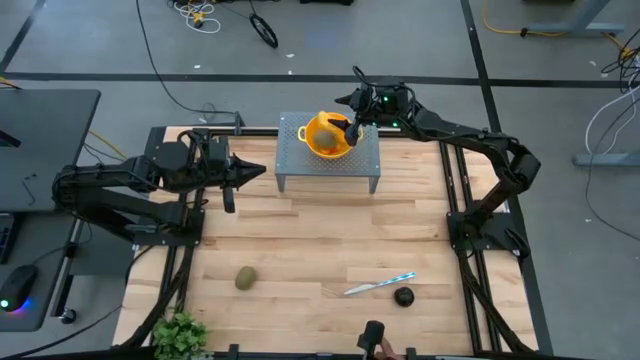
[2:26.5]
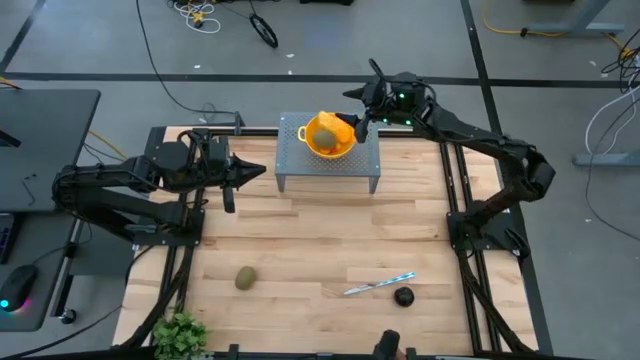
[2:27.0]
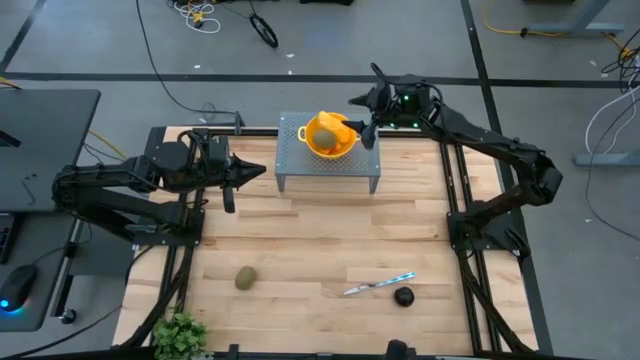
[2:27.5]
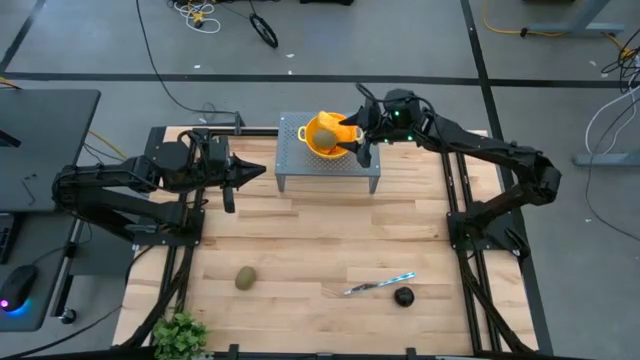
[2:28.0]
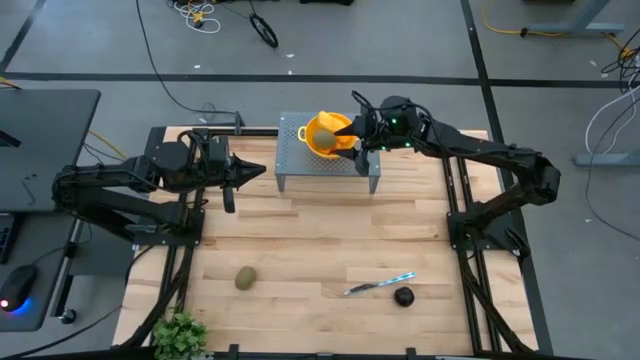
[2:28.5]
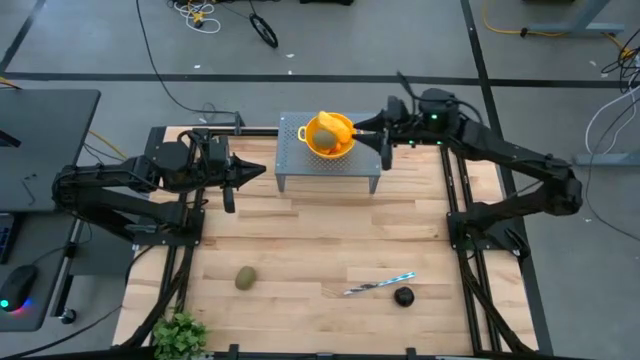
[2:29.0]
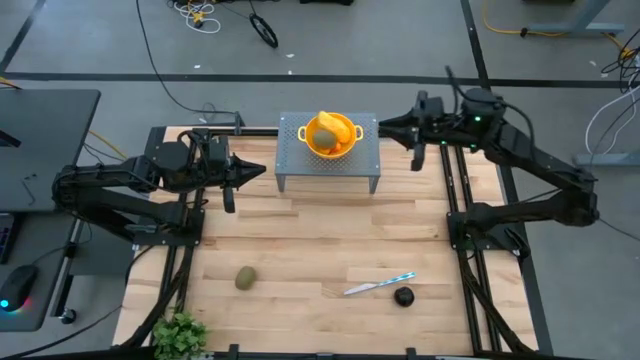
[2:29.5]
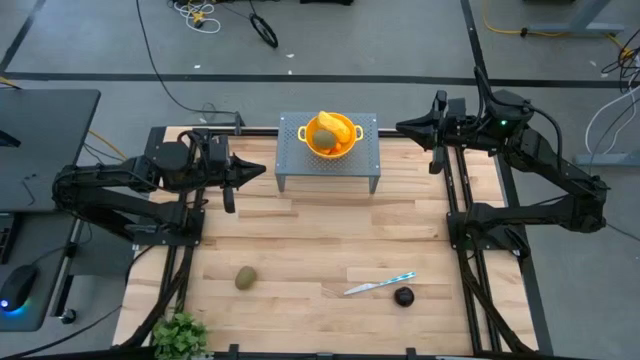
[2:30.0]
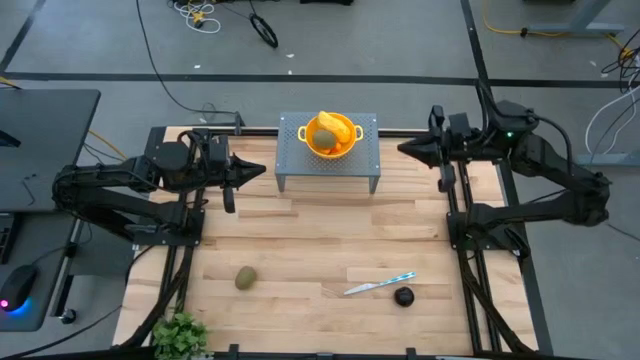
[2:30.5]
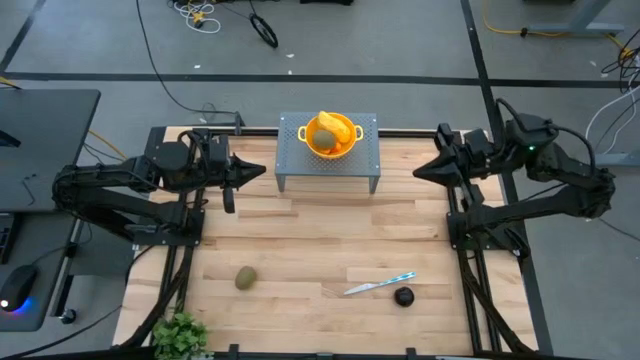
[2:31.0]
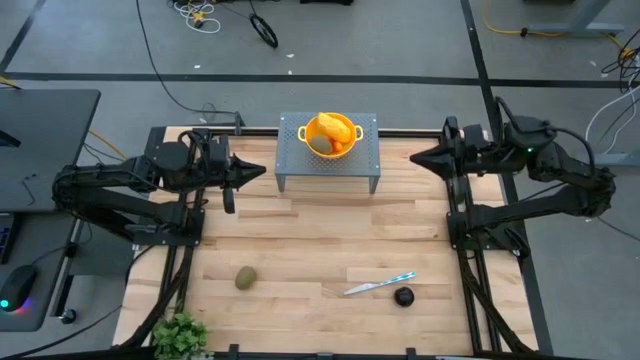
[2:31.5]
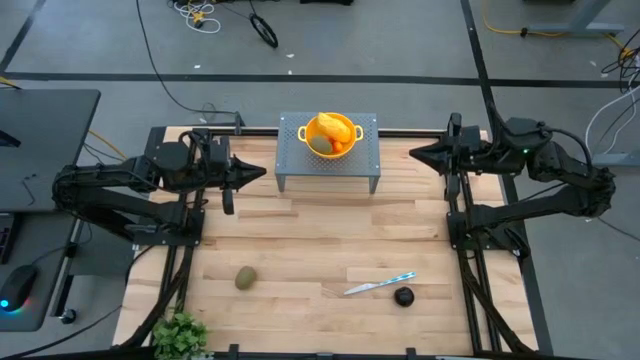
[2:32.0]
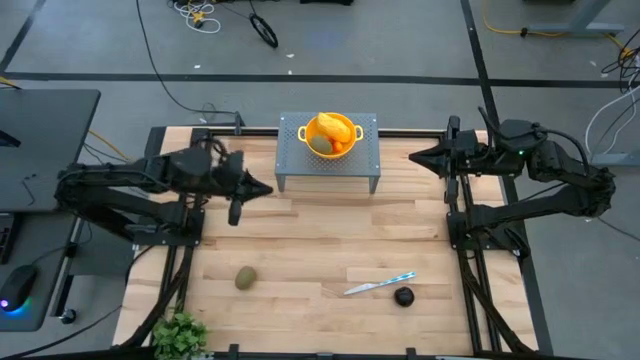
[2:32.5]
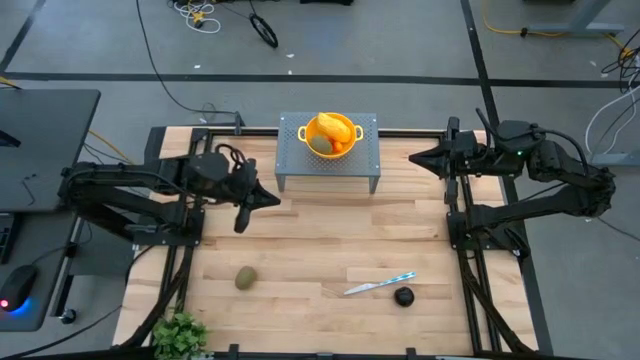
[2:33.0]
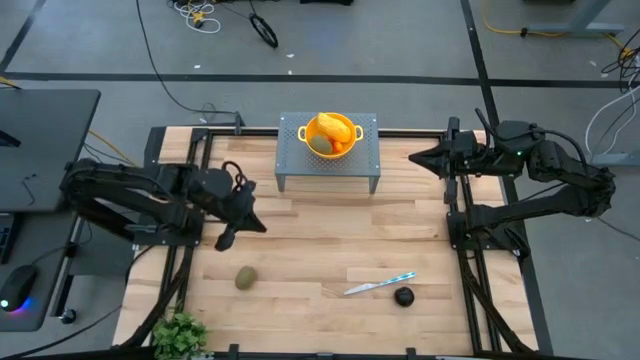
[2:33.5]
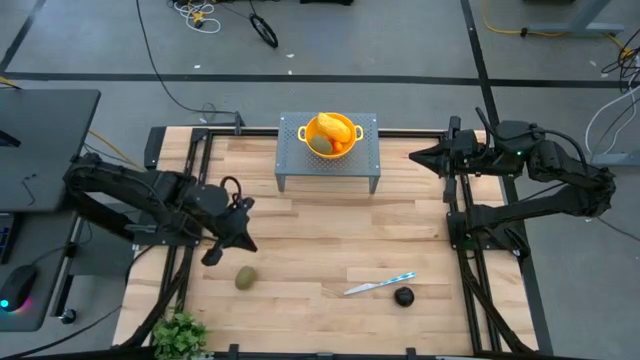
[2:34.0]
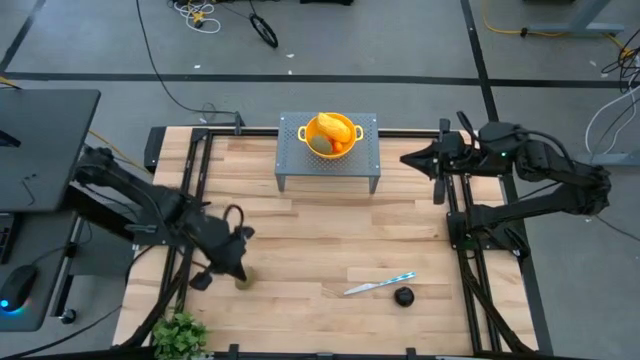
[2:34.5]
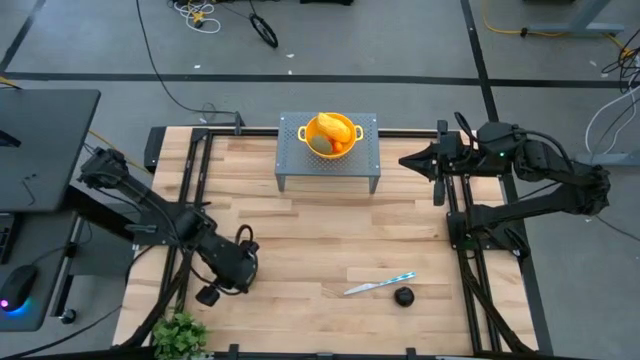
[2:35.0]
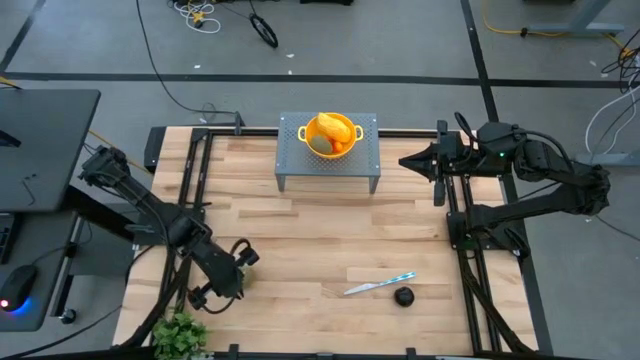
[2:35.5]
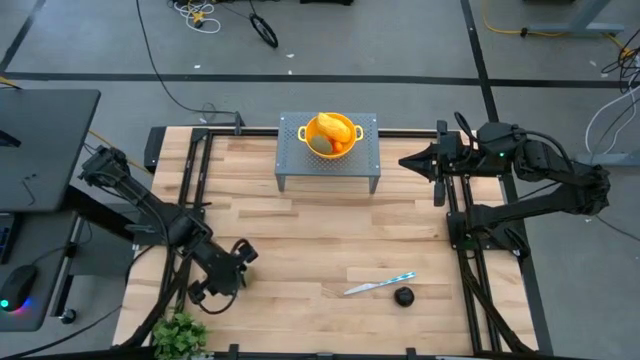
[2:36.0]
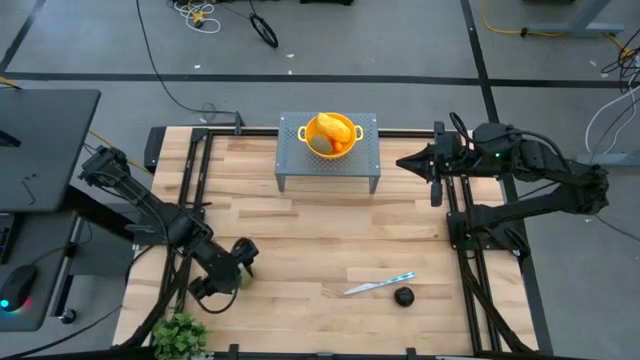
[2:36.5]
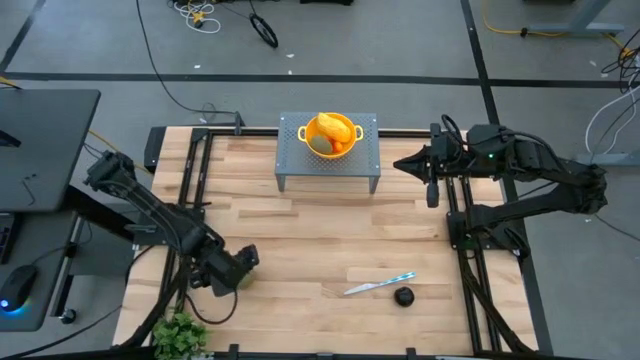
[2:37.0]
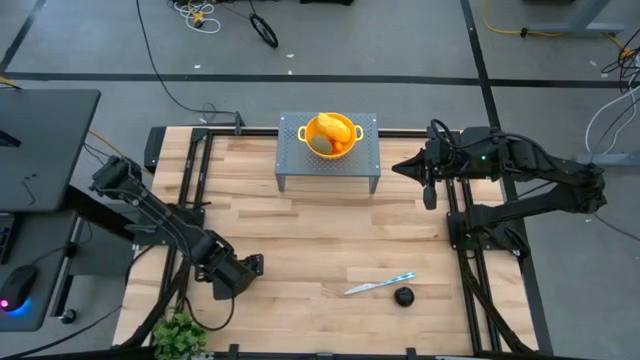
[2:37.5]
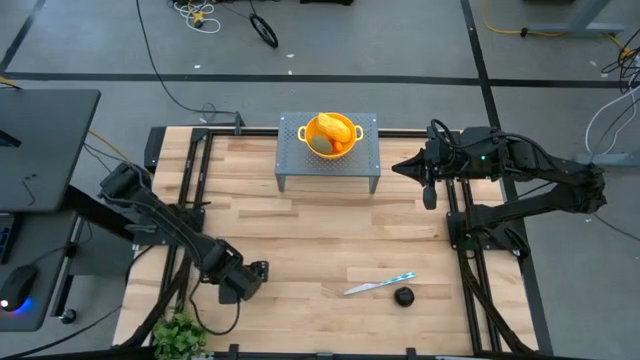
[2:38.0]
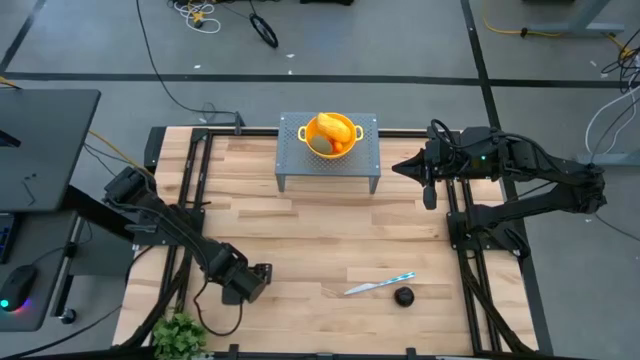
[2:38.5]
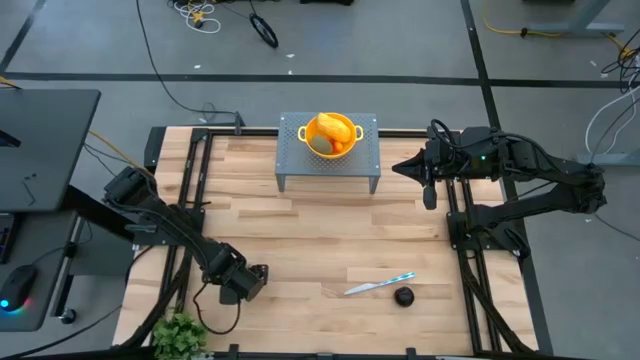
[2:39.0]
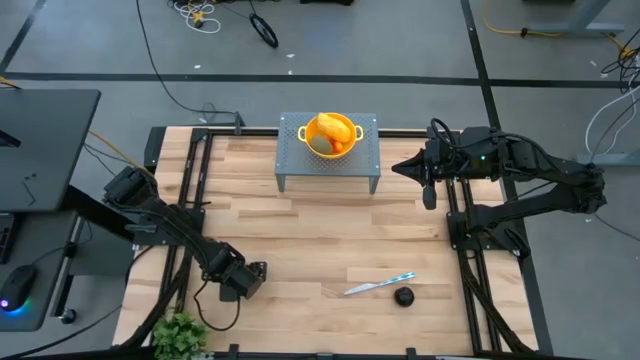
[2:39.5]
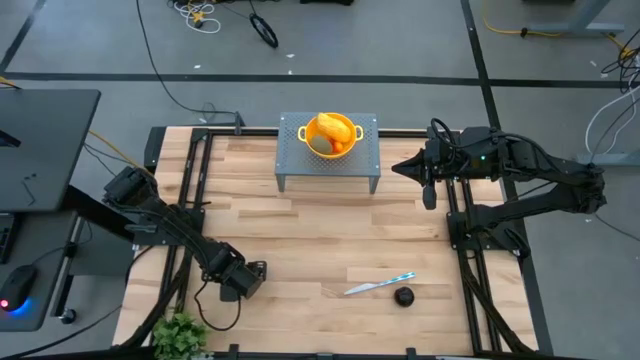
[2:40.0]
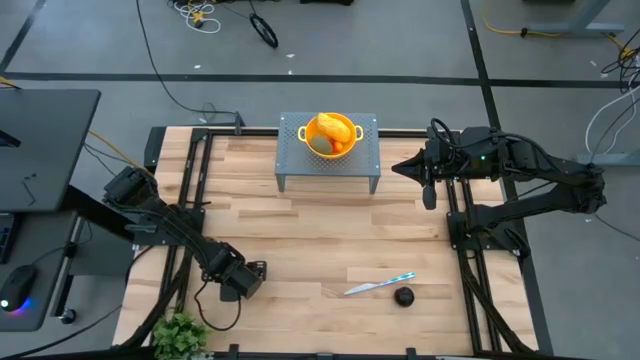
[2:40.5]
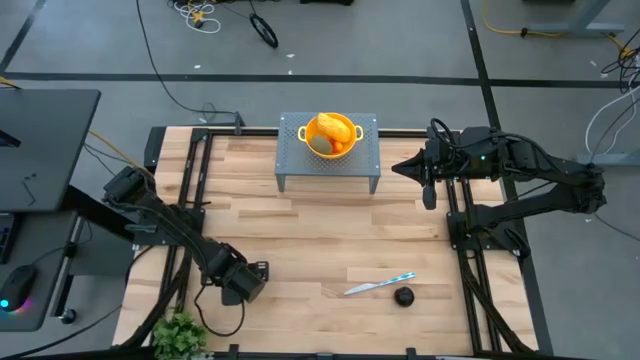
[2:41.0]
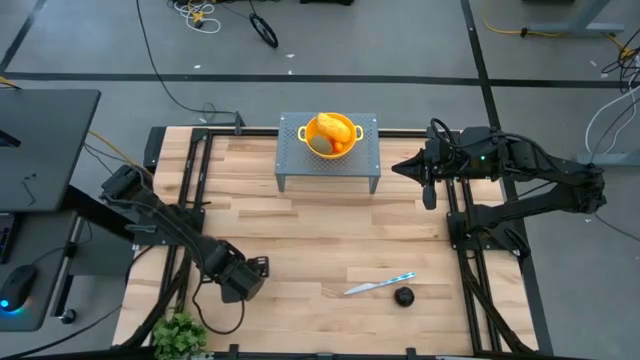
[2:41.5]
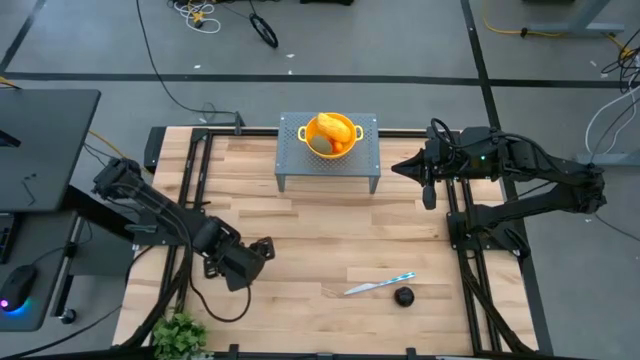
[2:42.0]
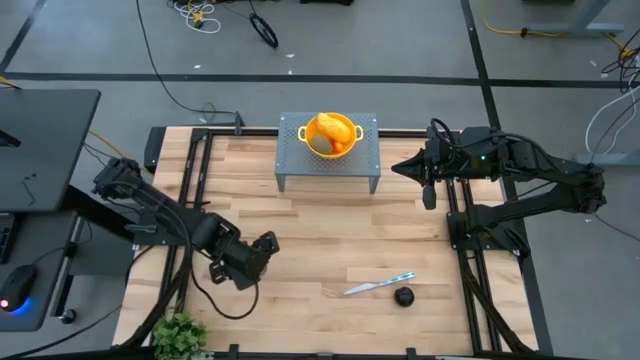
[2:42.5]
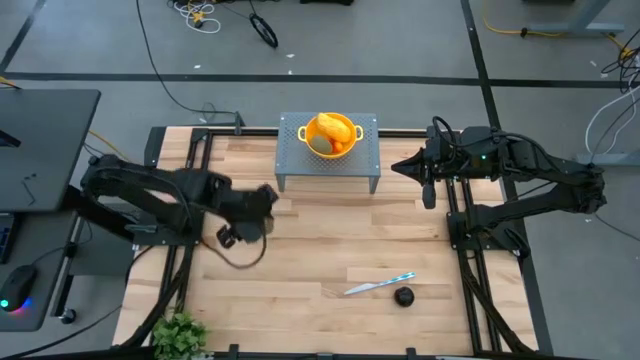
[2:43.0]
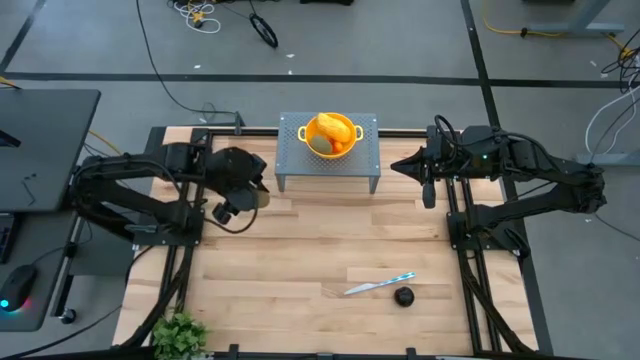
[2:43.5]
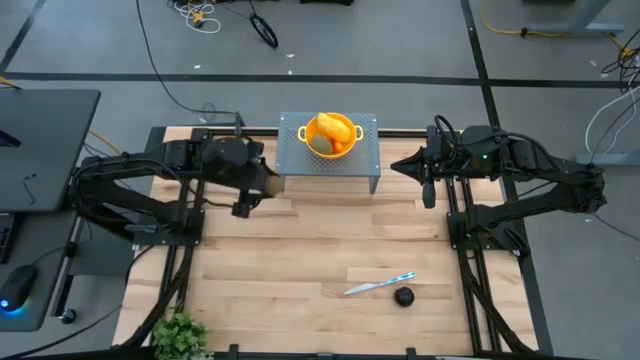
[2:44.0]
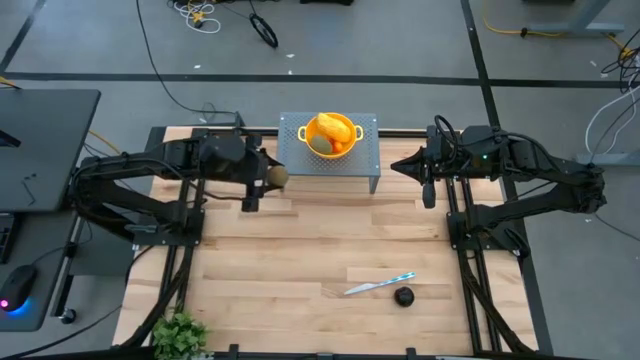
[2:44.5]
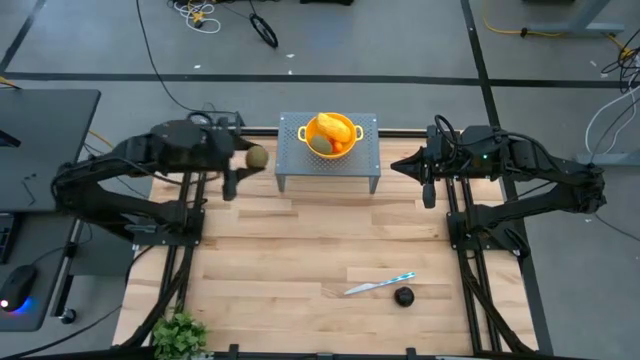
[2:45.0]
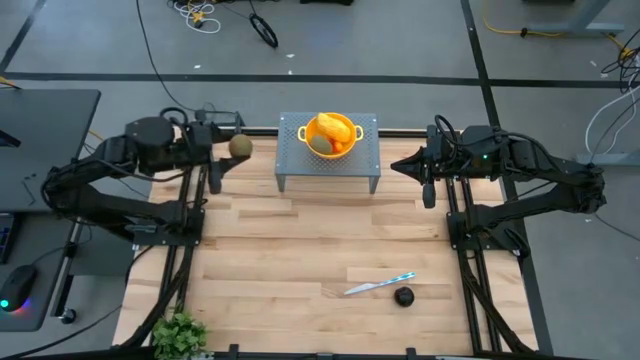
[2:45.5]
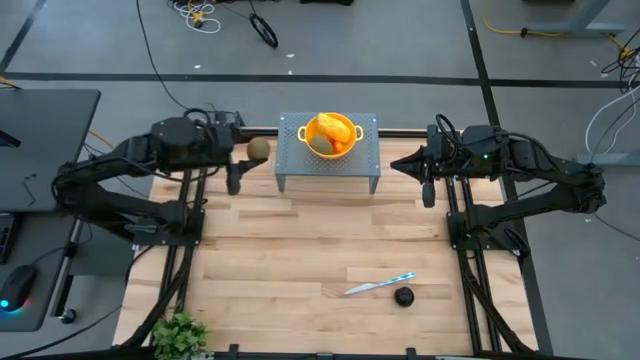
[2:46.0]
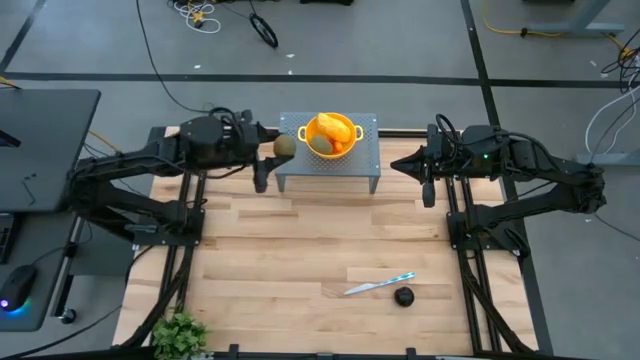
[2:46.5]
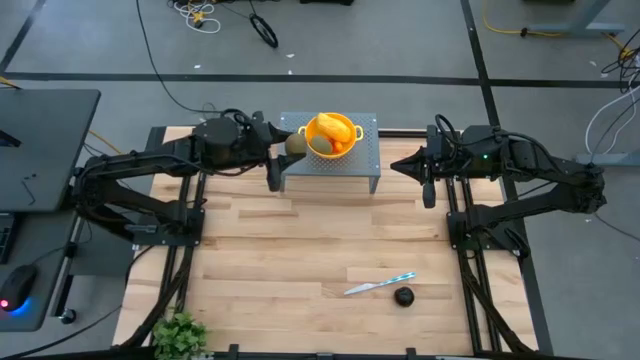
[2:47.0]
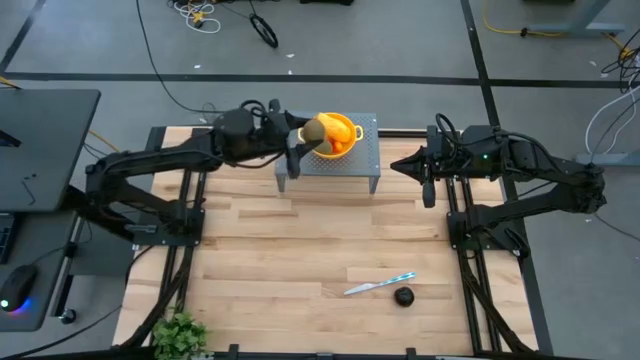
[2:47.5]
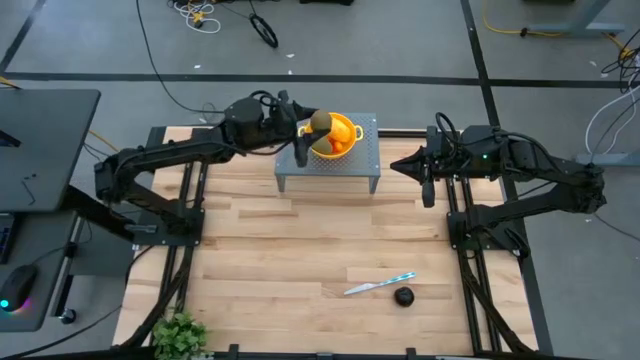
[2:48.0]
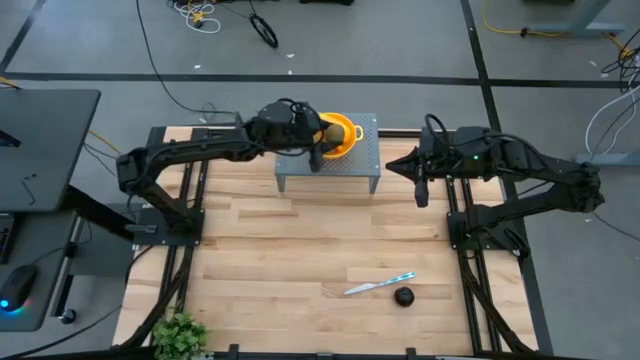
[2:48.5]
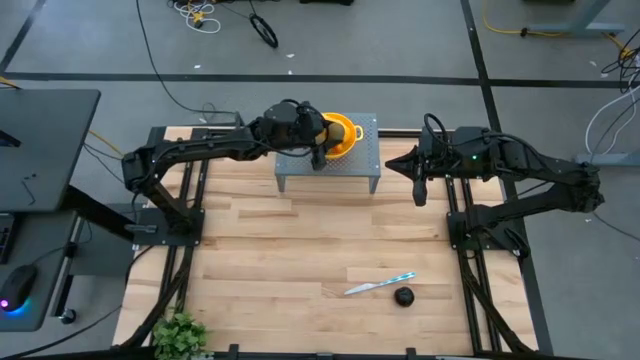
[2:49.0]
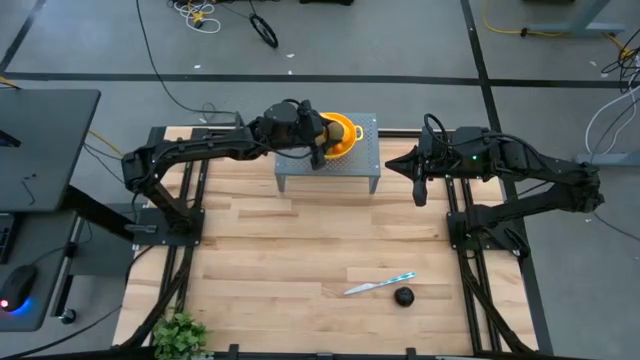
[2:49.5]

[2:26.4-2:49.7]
Task: Pick & Place Fruit
Put the brown kiwi into the yellow strainer bowl on the shelf
